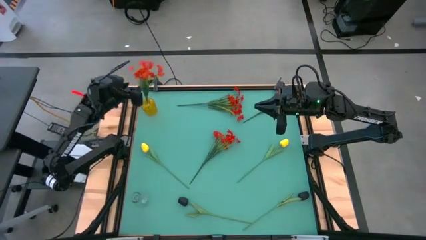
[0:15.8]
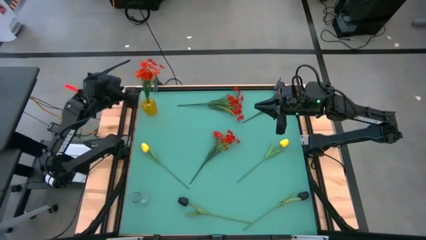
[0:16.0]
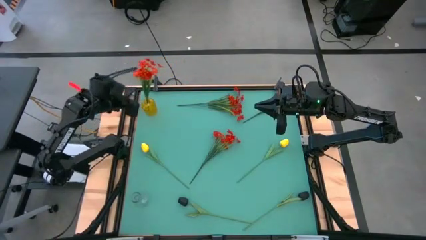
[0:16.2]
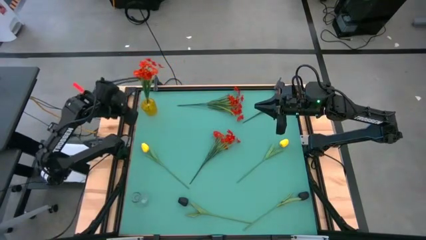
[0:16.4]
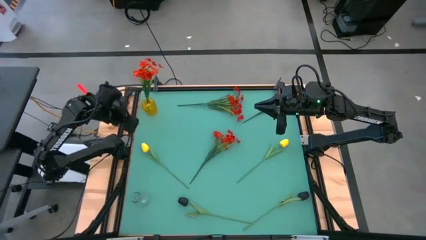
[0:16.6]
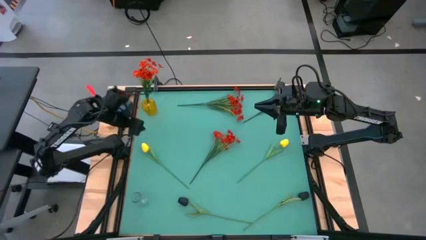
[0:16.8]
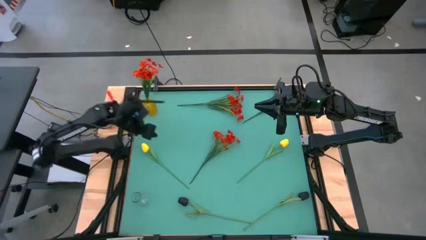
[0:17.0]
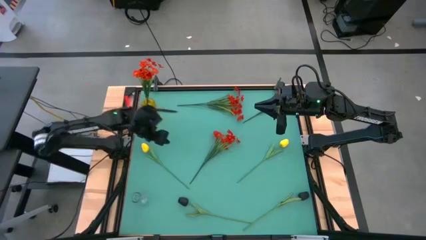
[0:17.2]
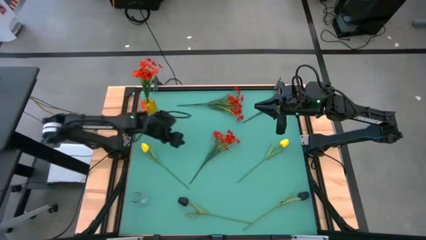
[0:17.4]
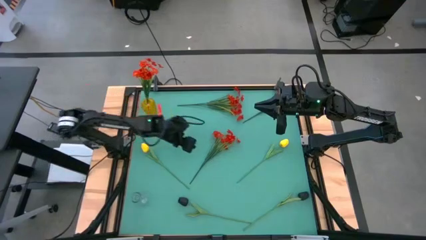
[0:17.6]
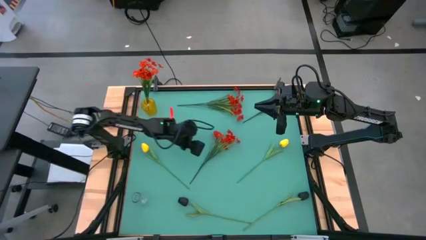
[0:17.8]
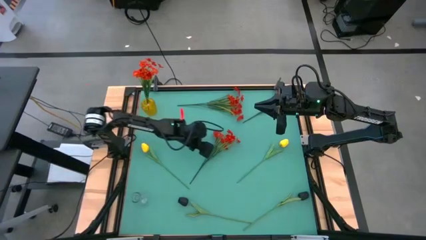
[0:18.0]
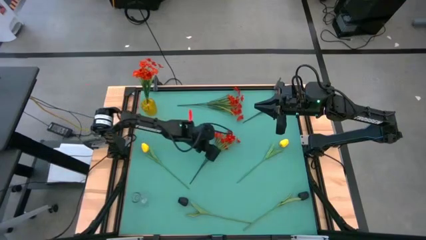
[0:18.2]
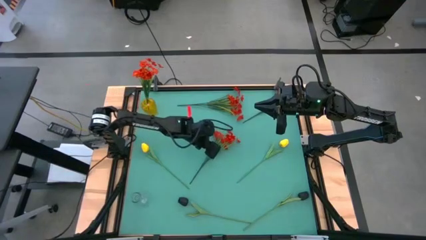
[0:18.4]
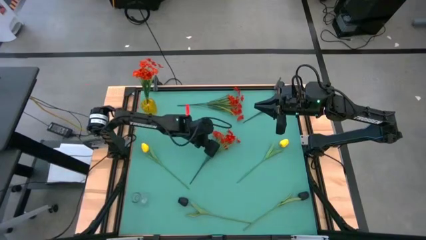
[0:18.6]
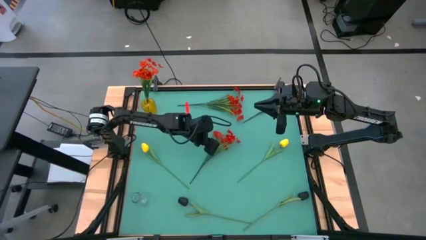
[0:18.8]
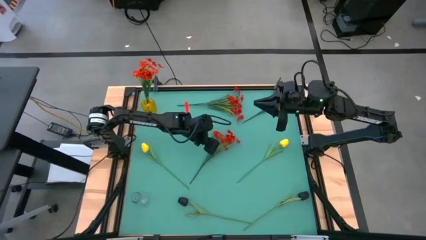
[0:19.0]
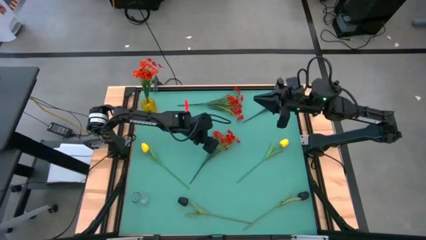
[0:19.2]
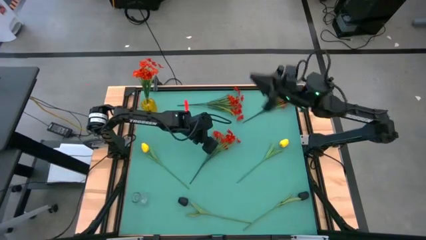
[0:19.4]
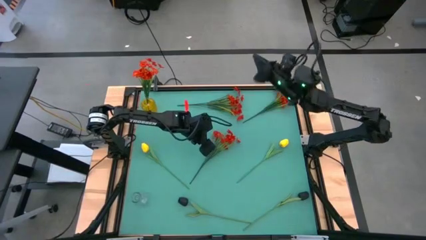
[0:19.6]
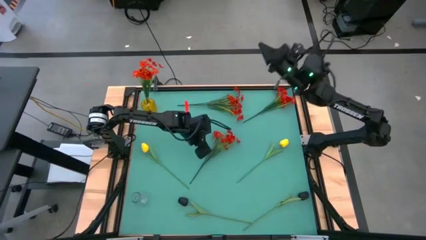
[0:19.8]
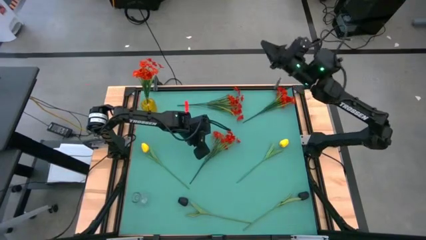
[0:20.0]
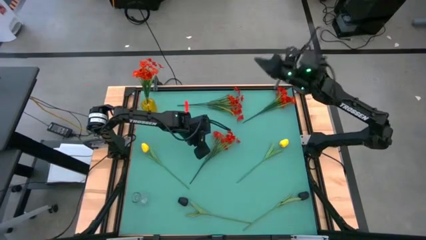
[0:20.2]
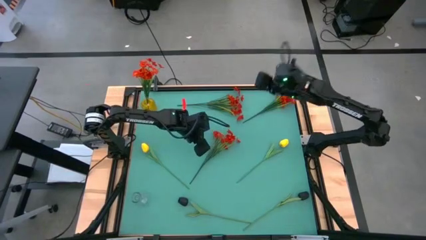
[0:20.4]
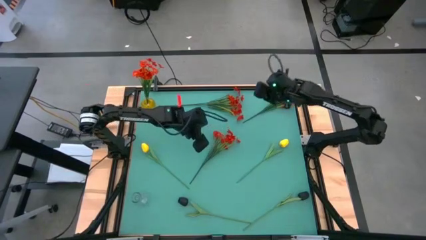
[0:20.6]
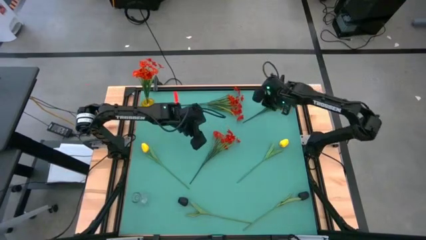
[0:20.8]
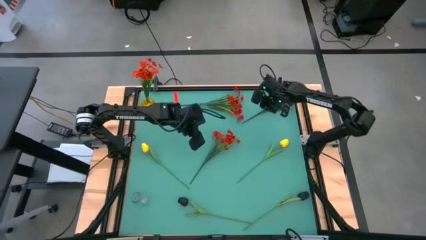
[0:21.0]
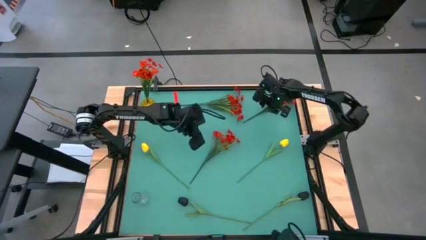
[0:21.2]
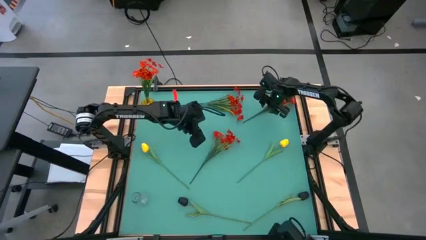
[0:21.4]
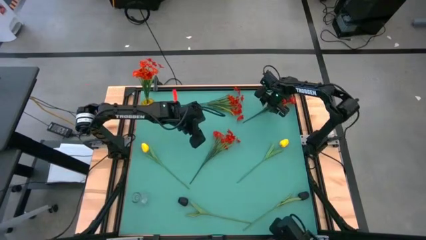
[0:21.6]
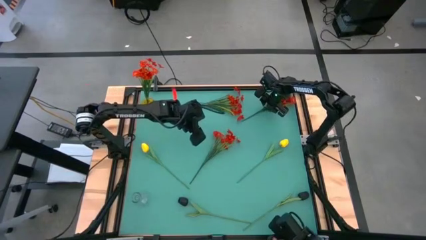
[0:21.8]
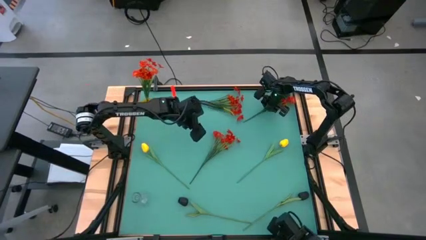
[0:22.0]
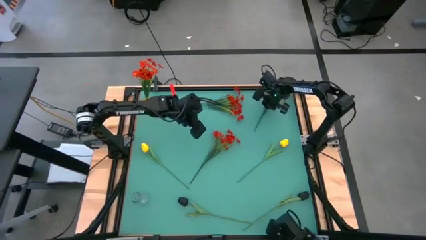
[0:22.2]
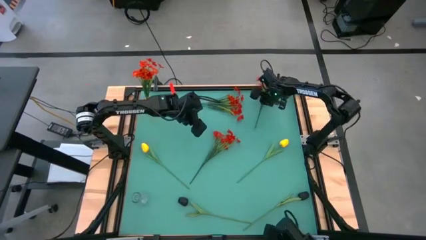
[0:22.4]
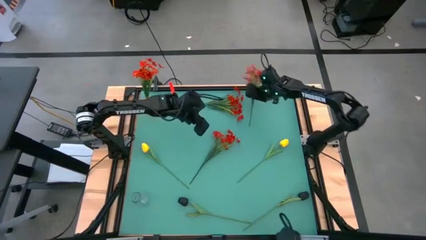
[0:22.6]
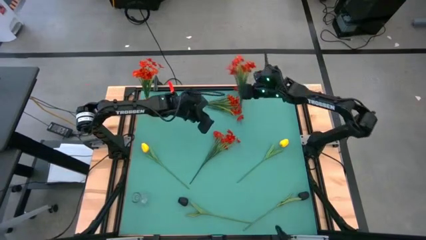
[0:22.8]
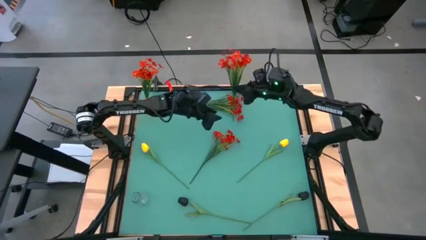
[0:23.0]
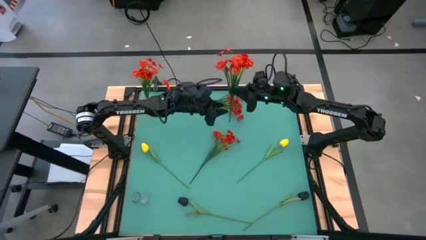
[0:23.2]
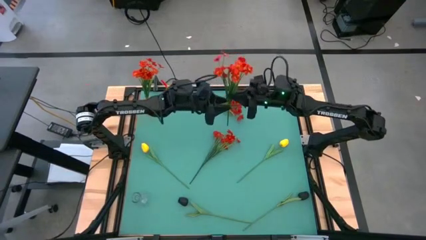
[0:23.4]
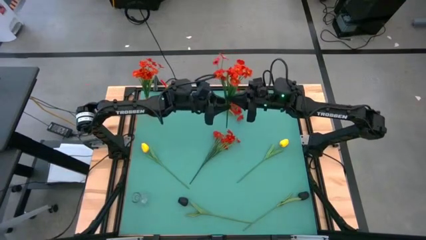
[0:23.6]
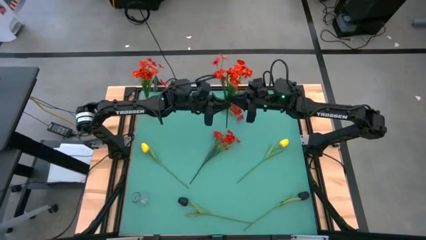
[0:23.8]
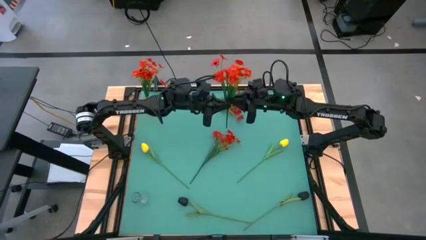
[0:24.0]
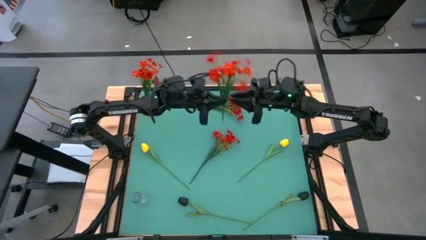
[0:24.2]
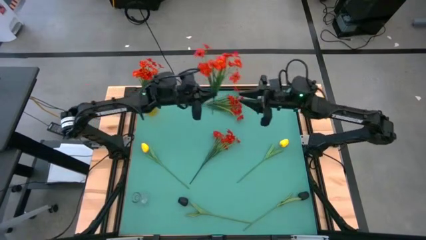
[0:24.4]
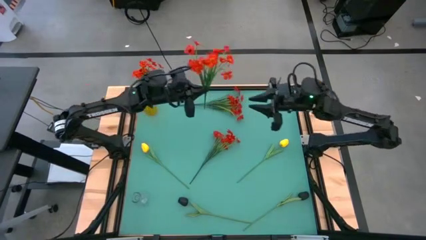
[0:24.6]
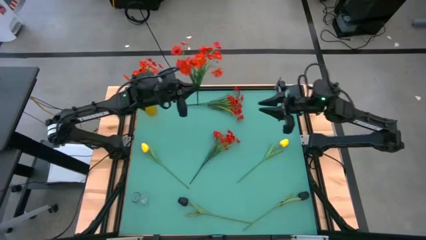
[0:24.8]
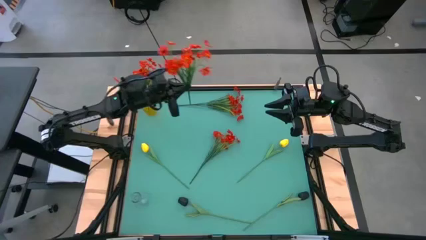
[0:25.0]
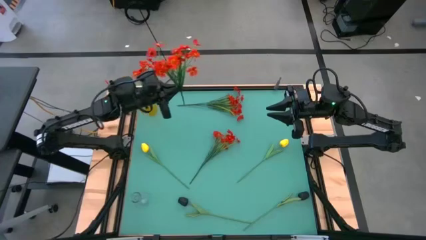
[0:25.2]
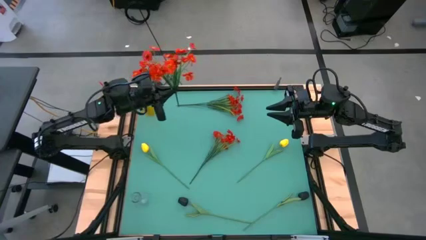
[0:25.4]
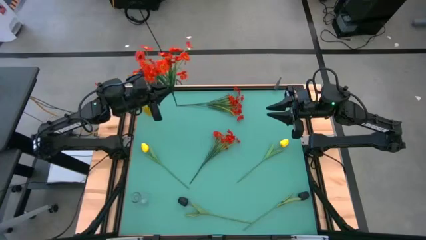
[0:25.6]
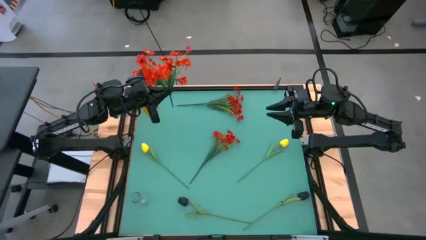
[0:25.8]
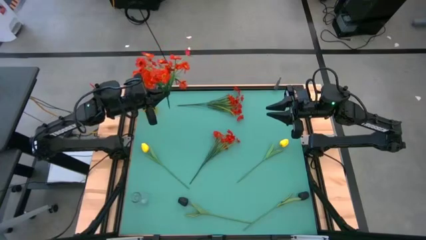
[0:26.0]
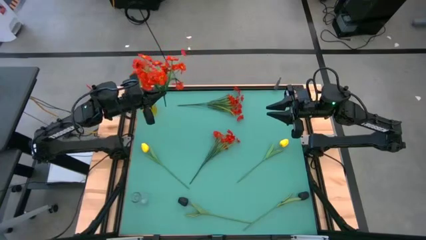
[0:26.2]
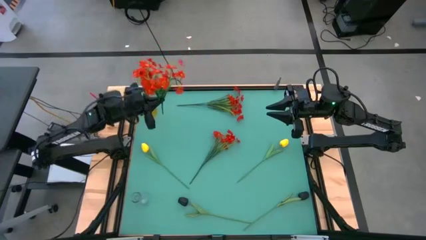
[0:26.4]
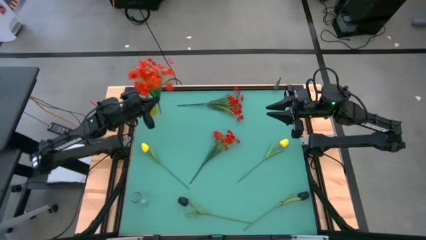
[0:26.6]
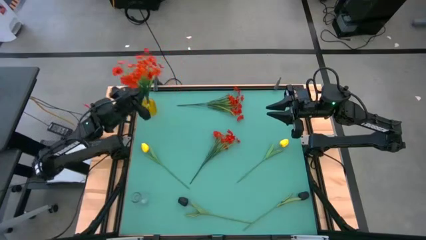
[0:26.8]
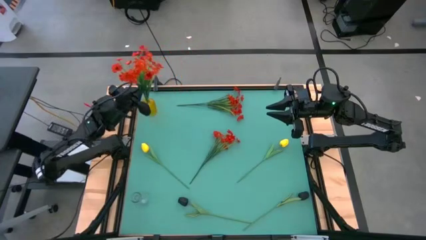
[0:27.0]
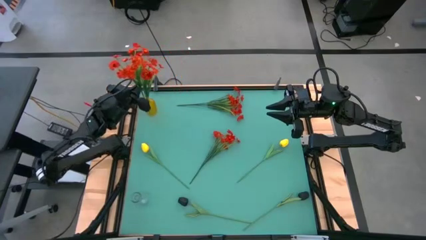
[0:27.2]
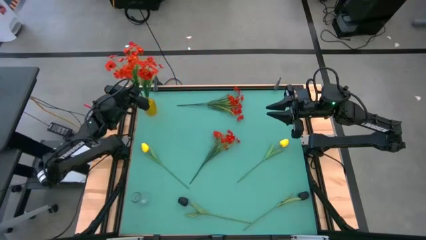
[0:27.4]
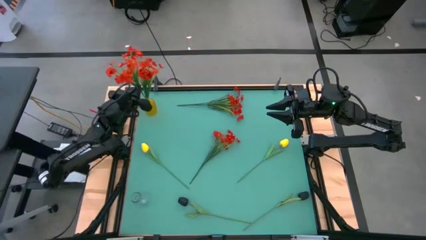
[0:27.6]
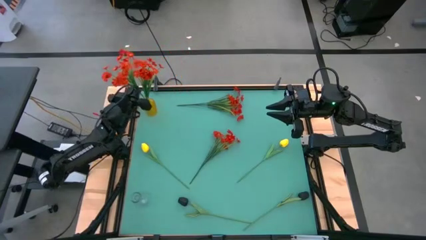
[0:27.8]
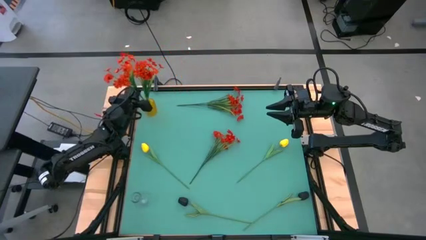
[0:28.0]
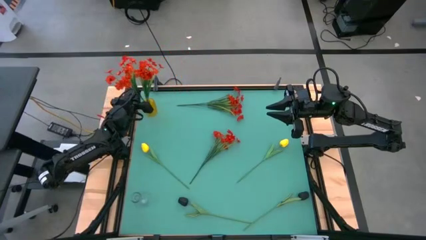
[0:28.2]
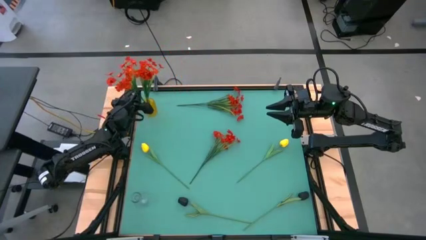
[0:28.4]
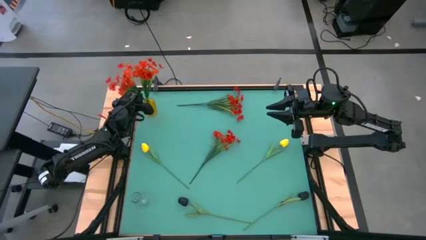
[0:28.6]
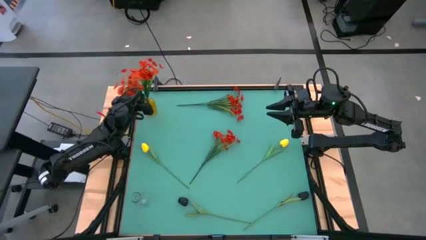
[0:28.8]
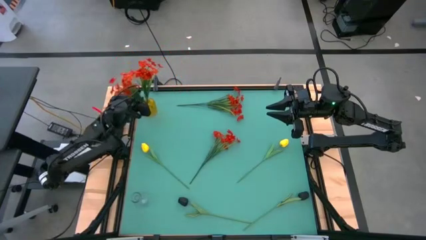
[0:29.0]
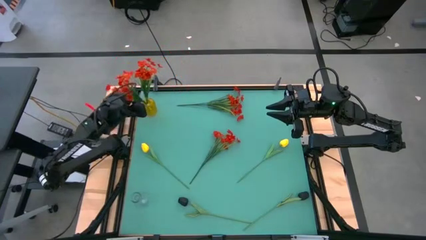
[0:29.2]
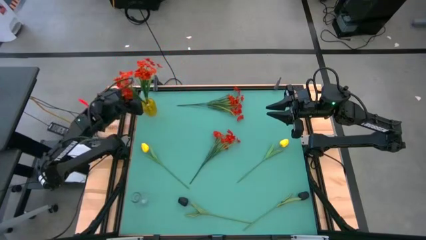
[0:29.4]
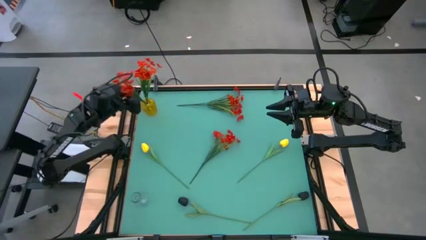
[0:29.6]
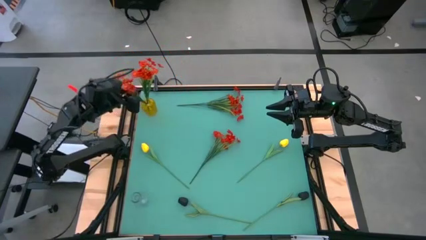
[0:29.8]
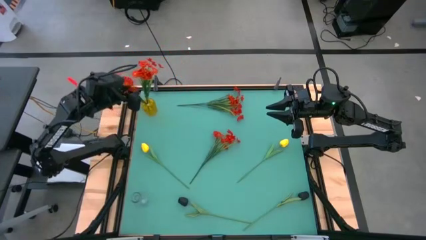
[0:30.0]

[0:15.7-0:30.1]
Task: Sort flowers into vase by color
Put the orange flowers into the yellow vase
